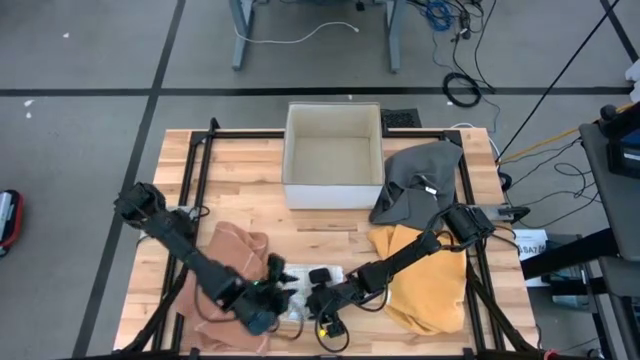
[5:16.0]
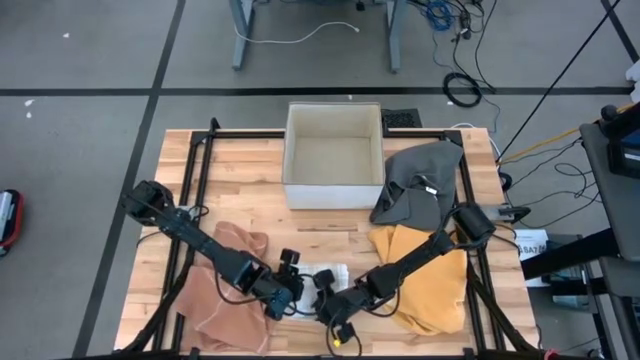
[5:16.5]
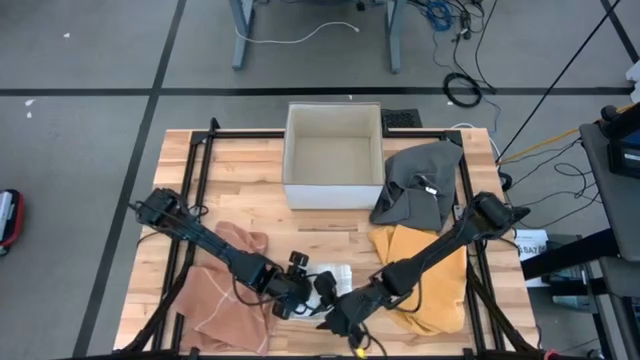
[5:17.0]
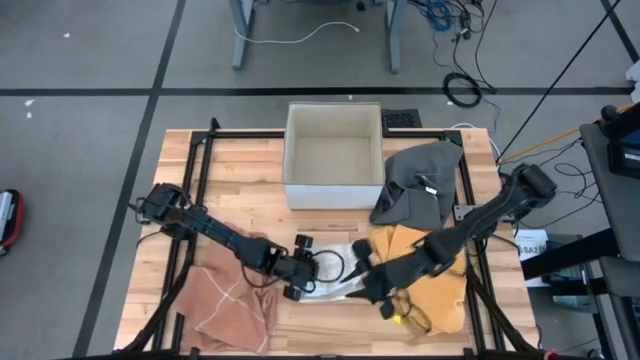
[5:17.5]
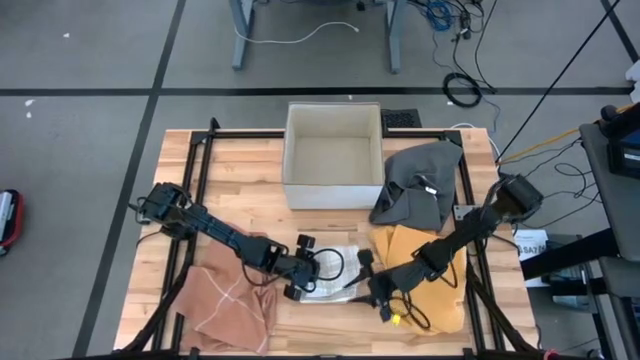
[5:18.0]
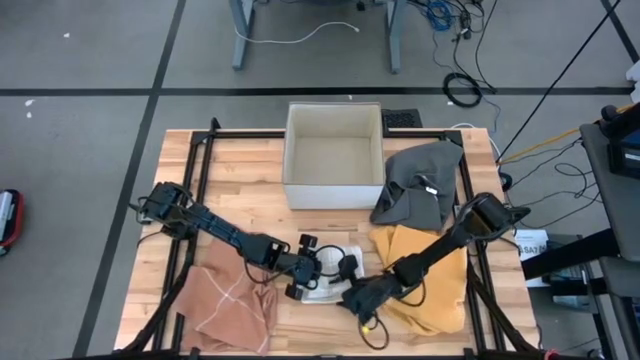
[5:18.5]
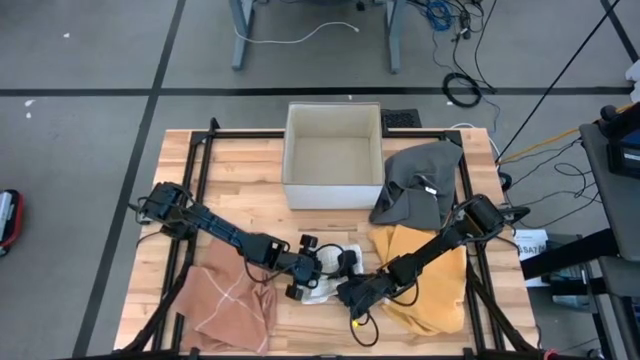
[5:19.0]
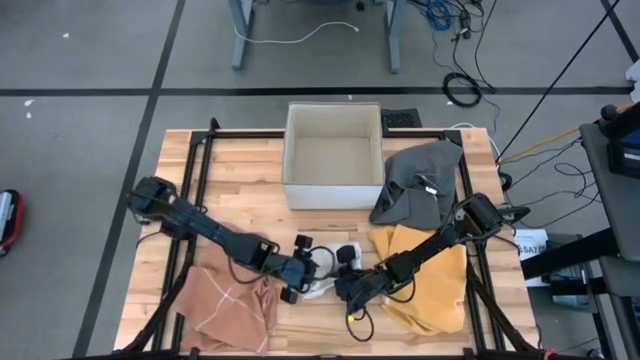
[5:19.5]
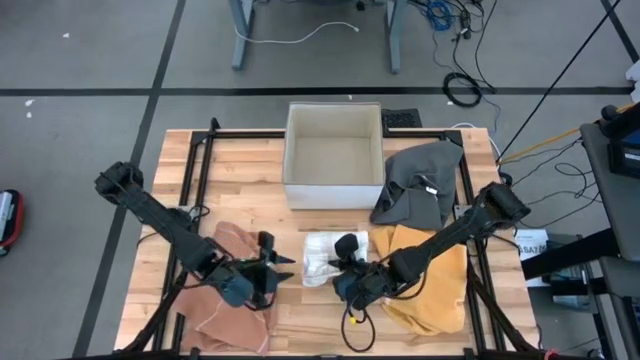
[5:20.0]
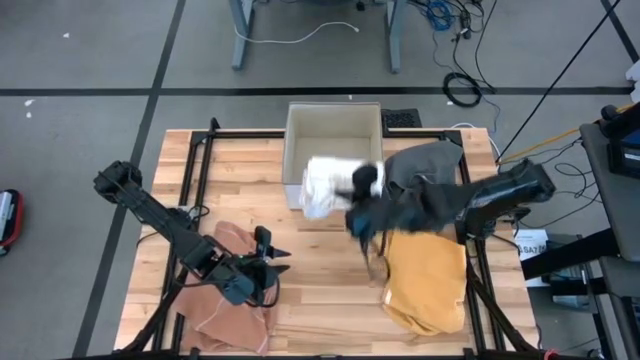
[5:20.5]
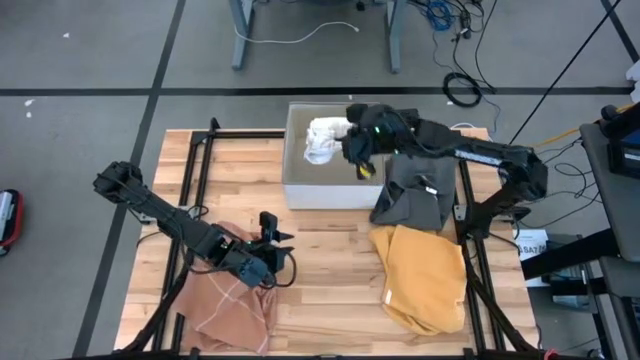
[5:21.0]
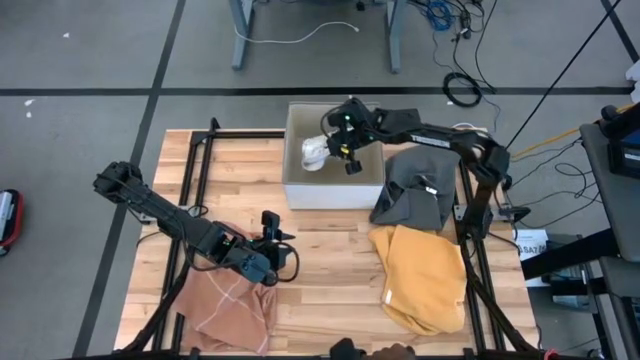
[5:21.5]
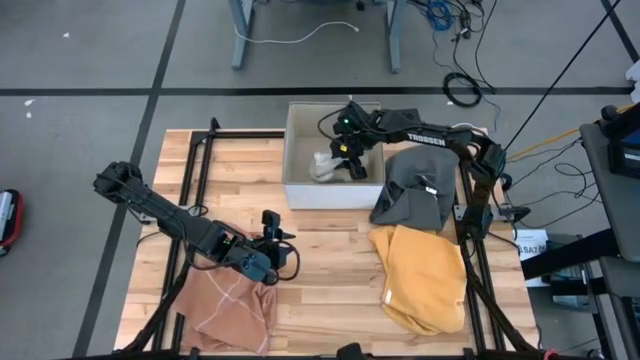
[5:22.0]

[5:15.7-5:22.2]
Task: Fold towel
Put the folded white patterned towel into the laundry bin

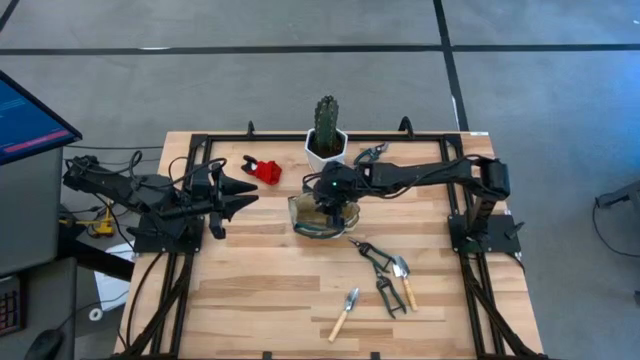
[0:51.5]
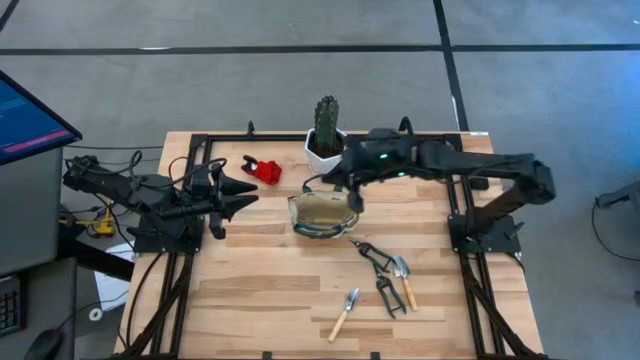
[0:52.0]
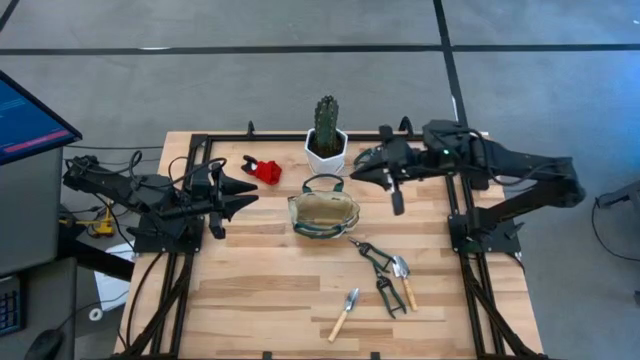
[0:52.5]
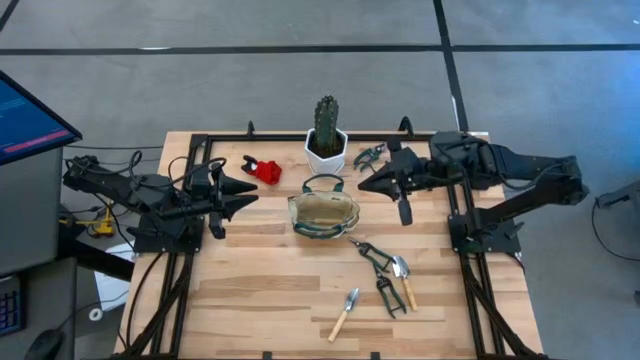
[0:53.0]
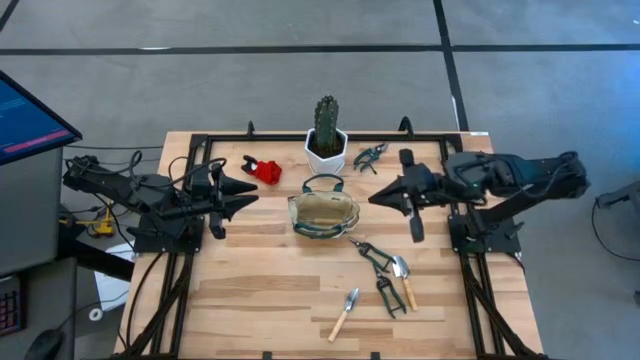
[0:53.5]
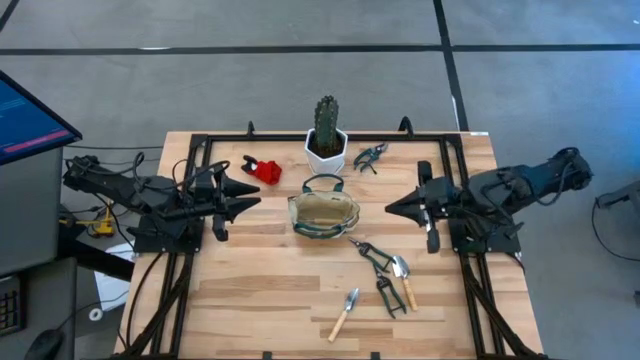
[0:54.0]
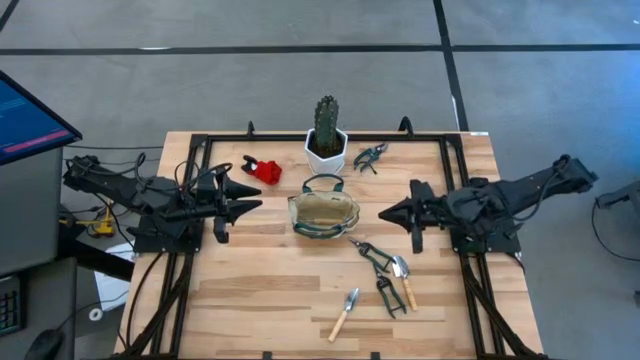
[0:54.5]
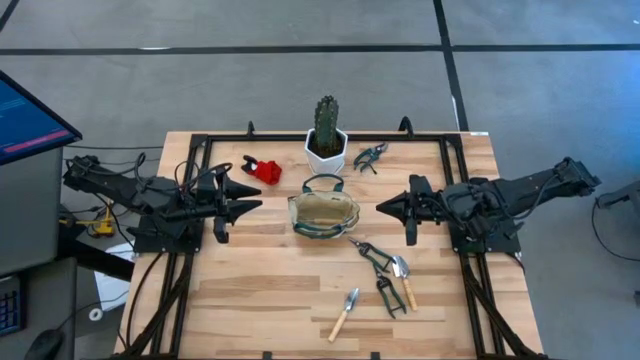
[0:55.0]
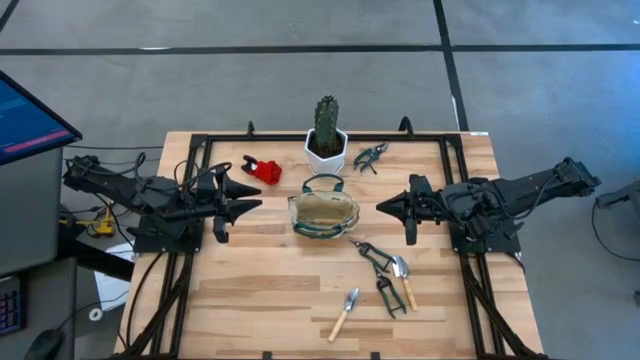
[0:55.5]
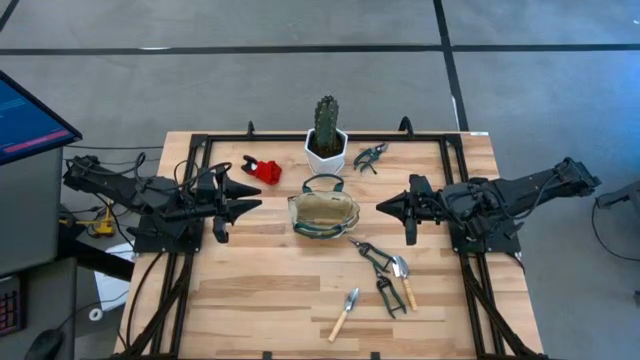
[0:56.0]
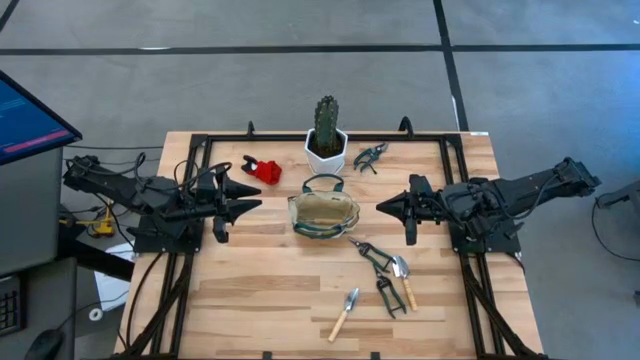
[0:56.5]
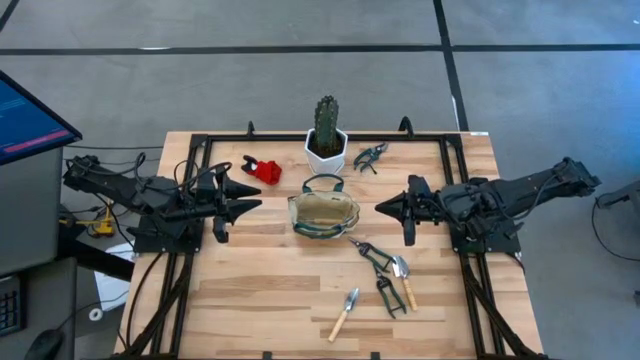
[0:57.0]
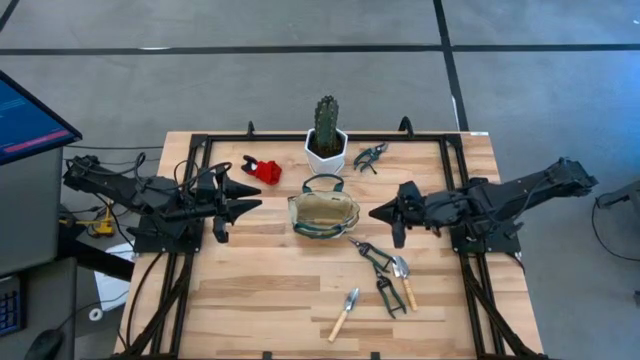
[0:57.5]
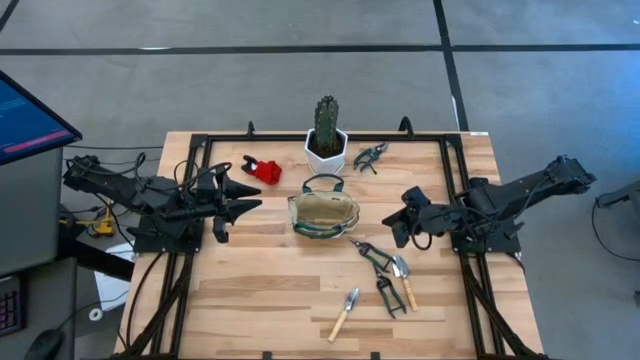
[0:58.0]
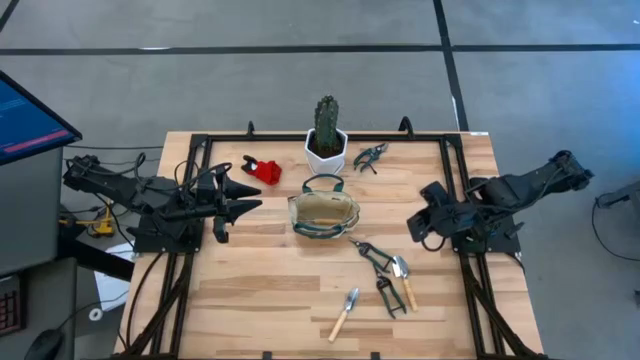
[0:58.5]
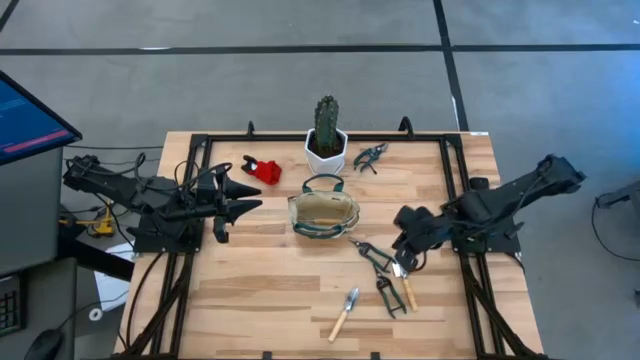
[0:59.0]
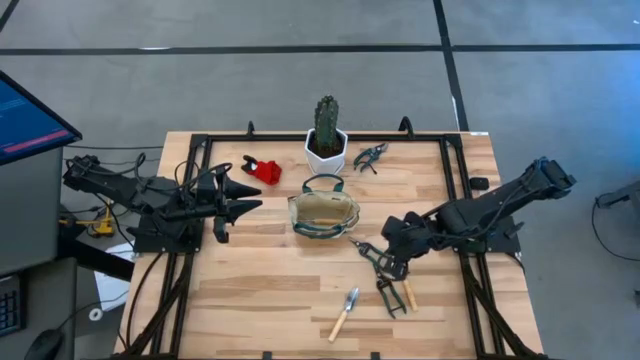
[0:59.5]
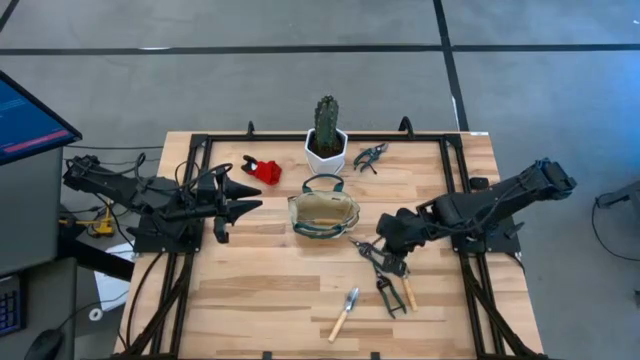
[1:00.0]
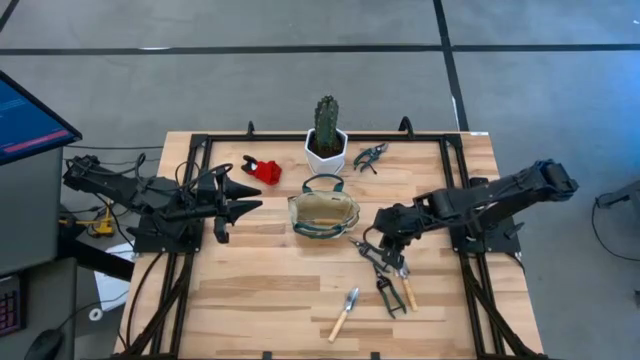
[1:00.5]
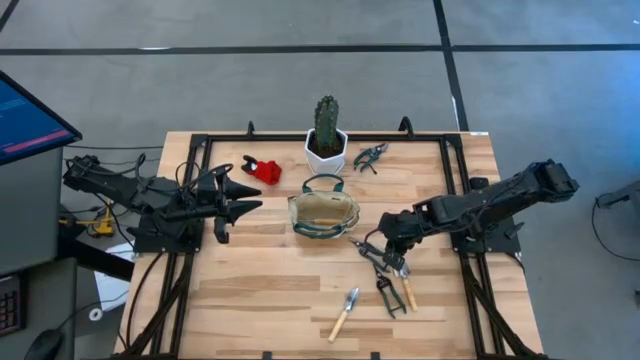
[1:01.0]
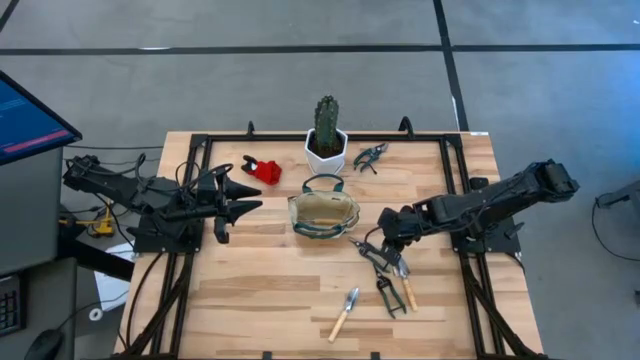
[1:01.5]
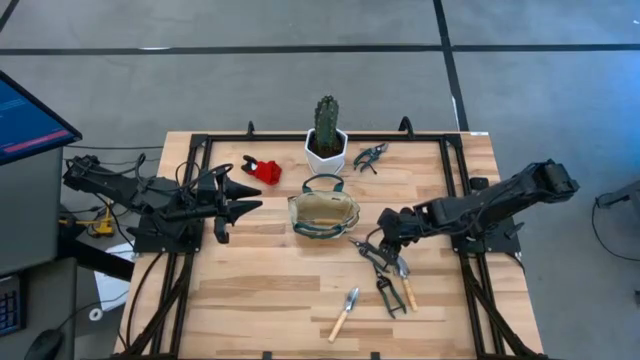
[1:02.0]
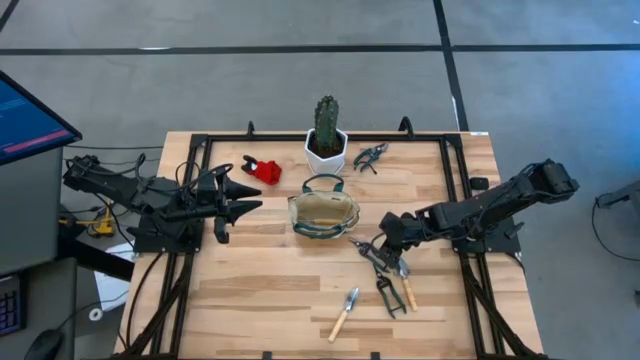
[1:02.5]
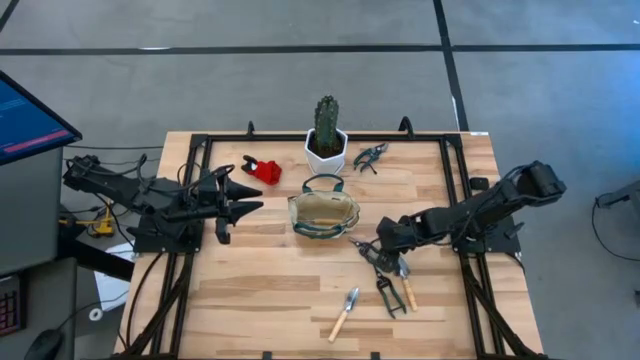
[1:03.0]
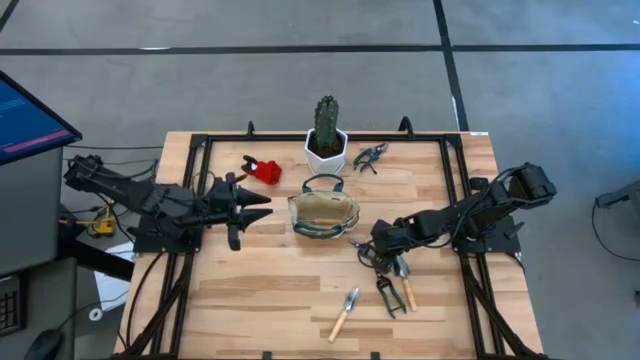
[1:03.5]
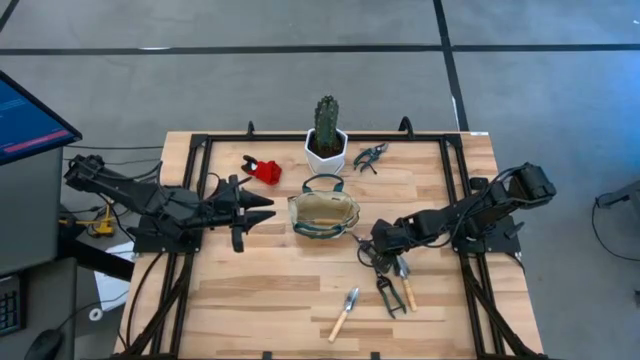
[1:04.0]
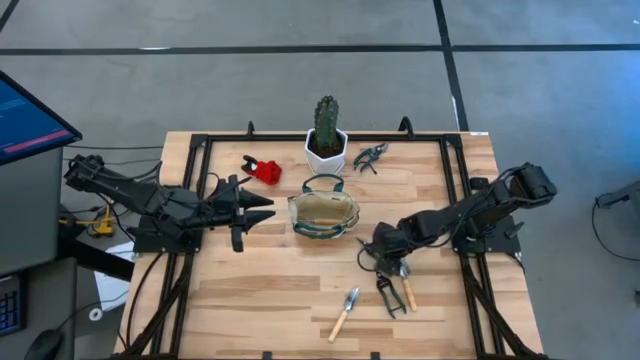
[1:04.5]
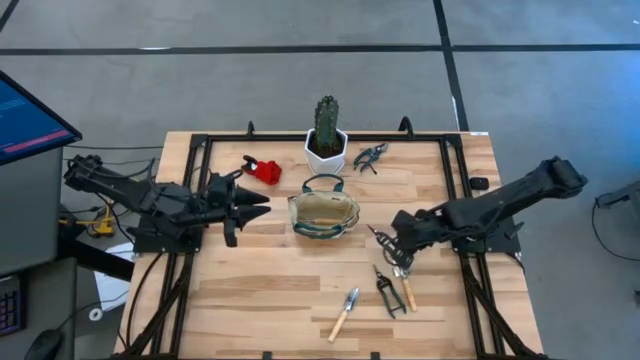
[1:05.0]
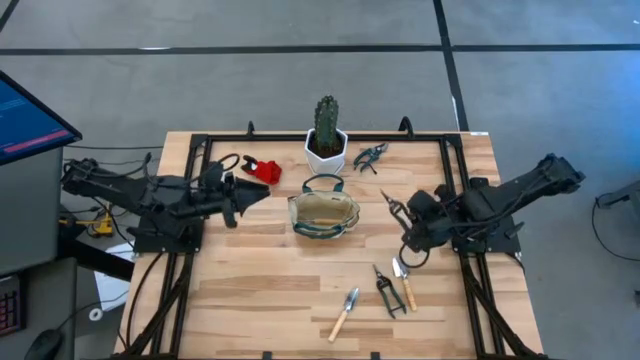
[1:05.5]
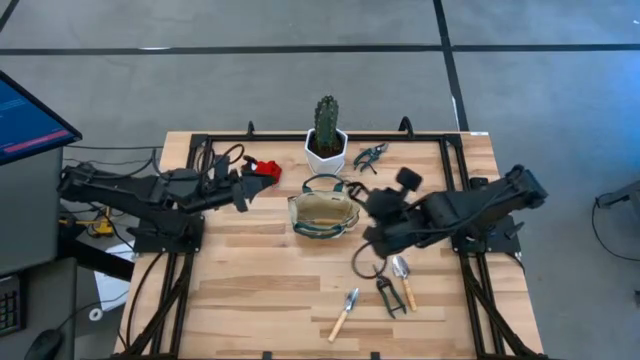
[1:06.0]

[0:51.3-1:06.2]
Task: Pick & Place Garden tools in Gardening bag
Put the middle green shear scissors into the gardening bag

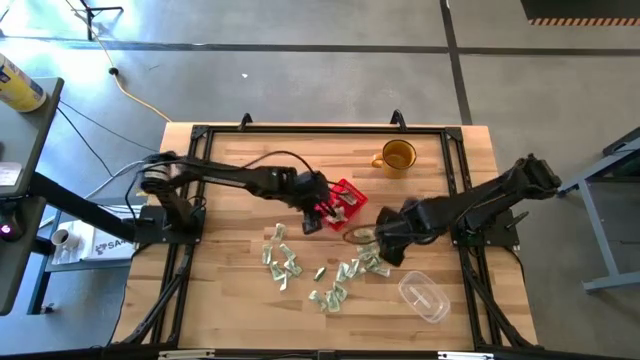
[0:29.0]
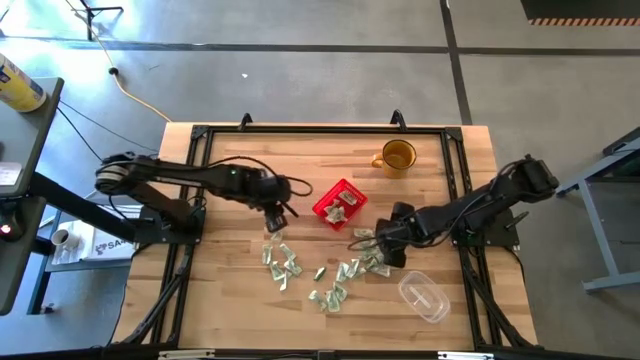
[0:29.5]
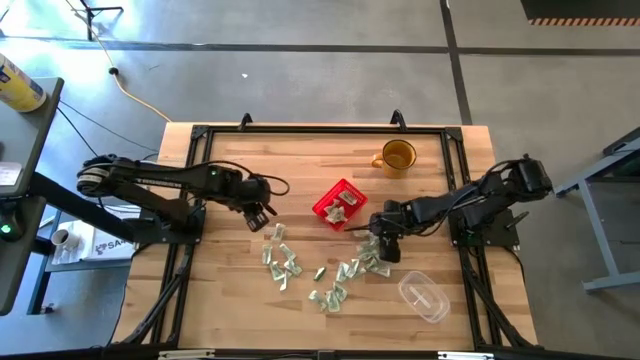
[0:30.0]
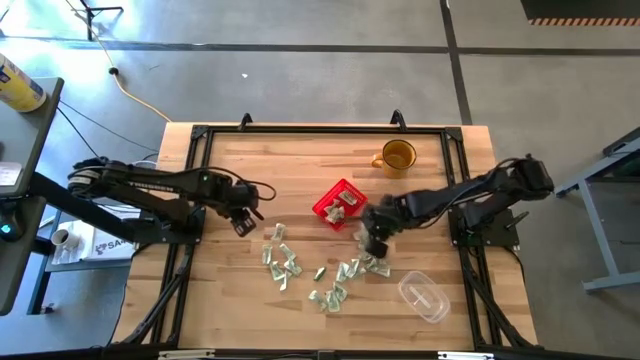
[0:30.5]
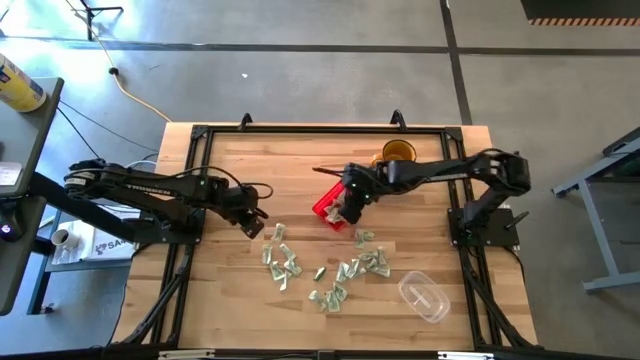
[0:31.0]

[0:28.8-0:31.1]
Task: Pick and place items into bin
Put the white stevia packet into the red bin
